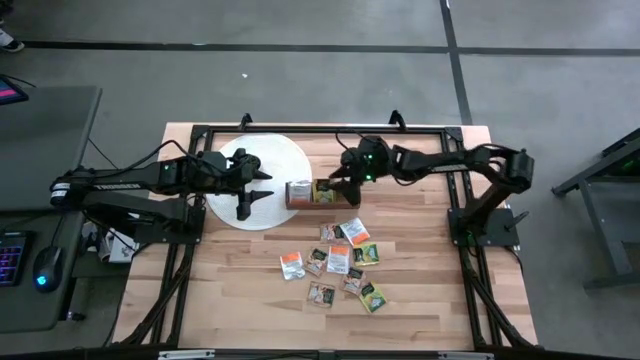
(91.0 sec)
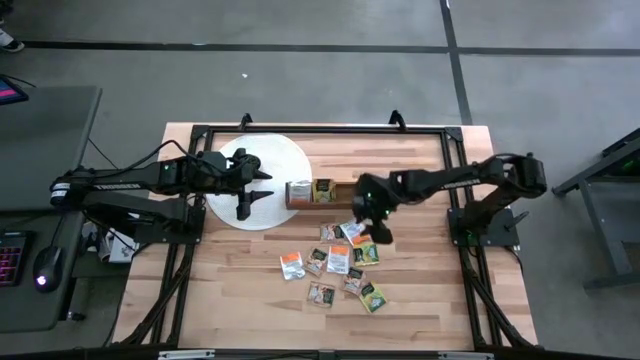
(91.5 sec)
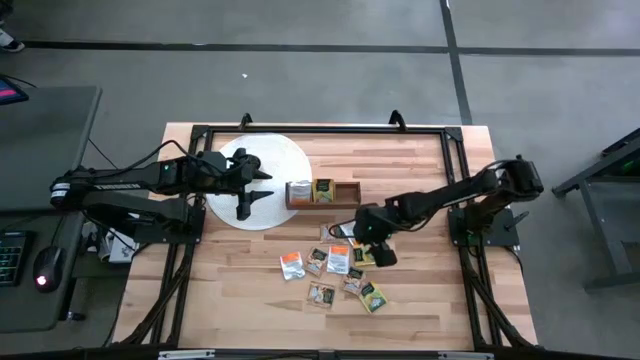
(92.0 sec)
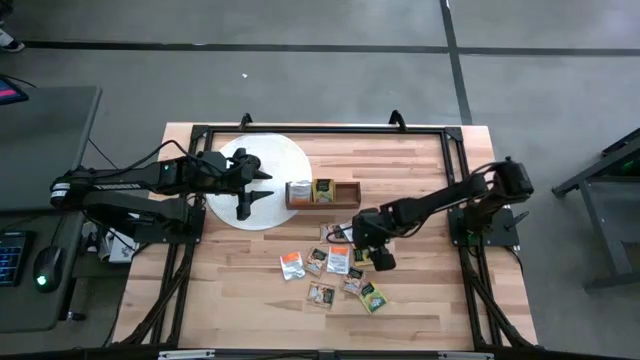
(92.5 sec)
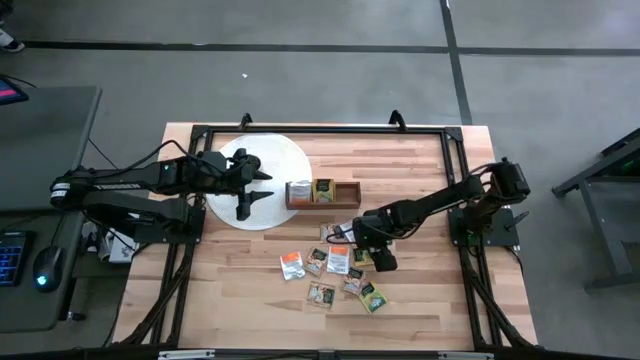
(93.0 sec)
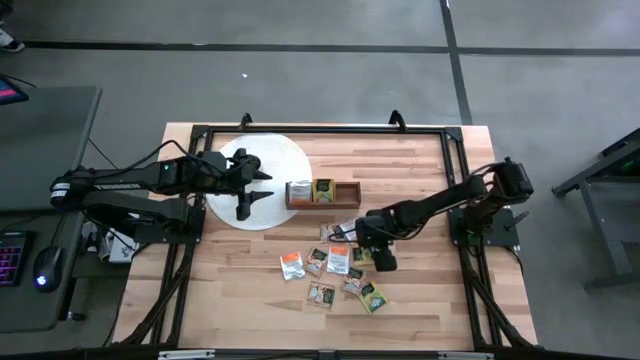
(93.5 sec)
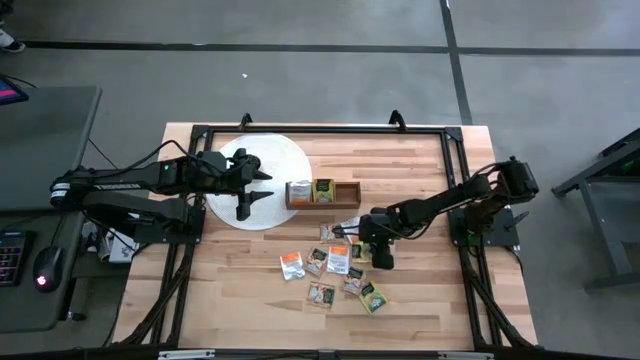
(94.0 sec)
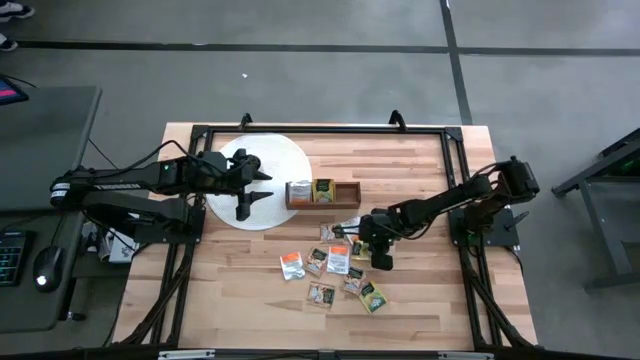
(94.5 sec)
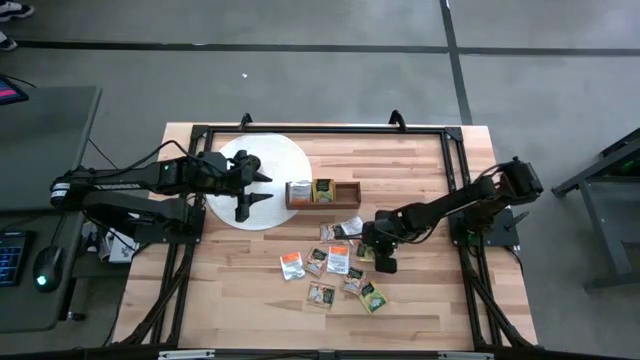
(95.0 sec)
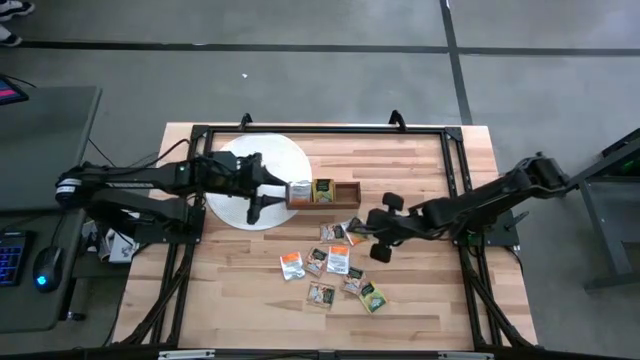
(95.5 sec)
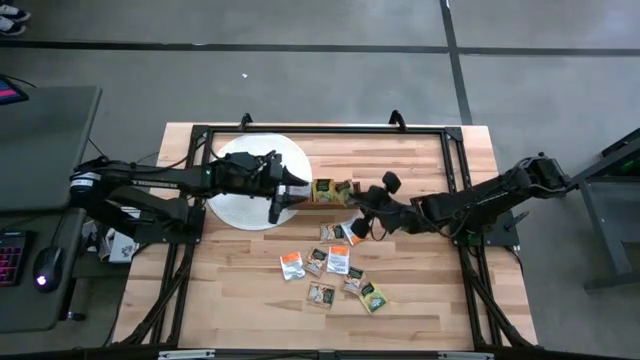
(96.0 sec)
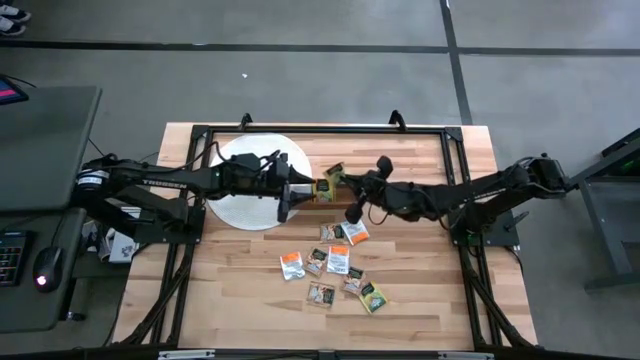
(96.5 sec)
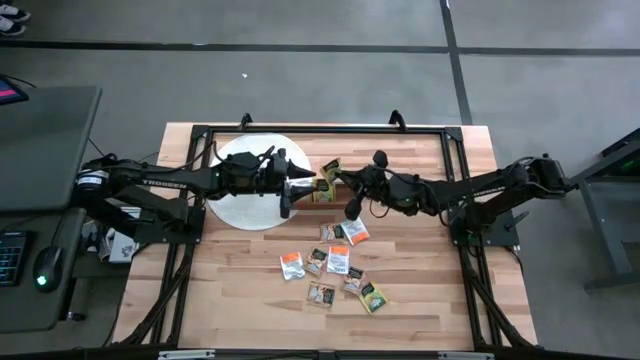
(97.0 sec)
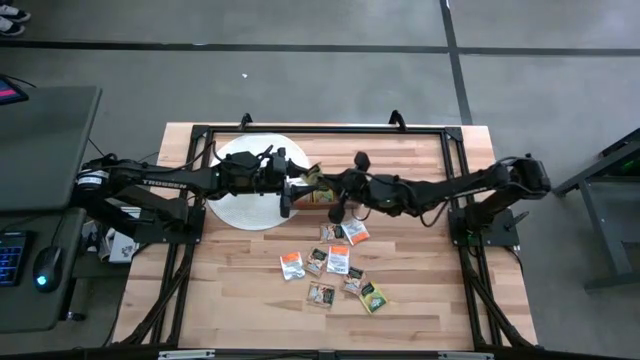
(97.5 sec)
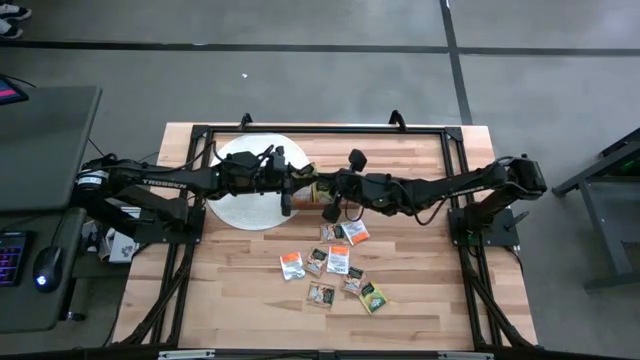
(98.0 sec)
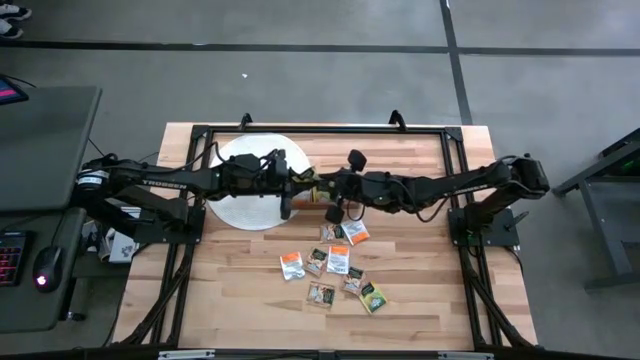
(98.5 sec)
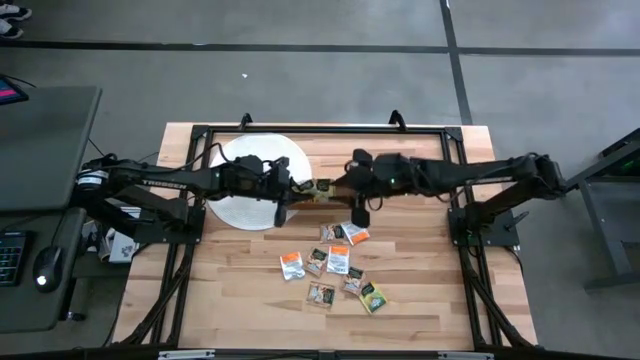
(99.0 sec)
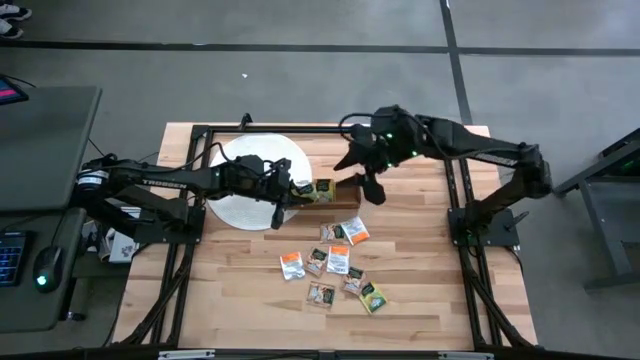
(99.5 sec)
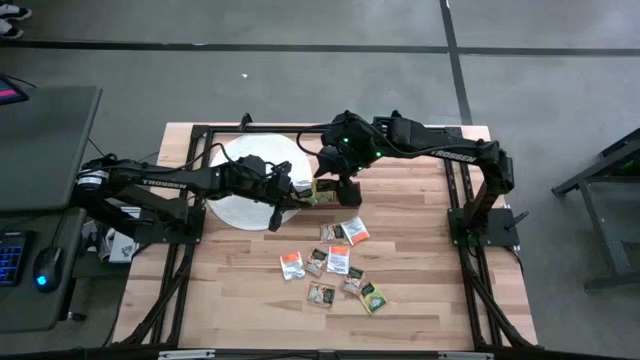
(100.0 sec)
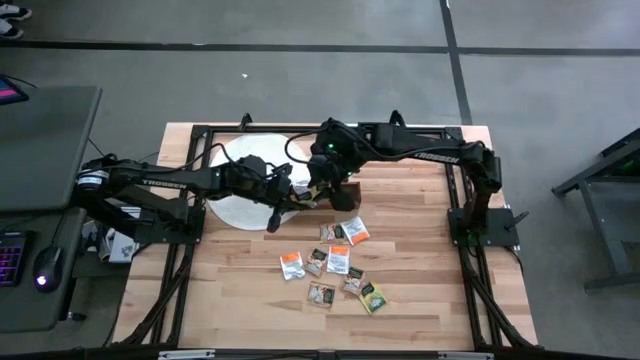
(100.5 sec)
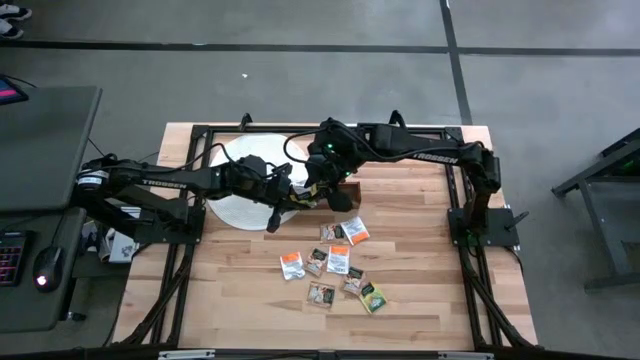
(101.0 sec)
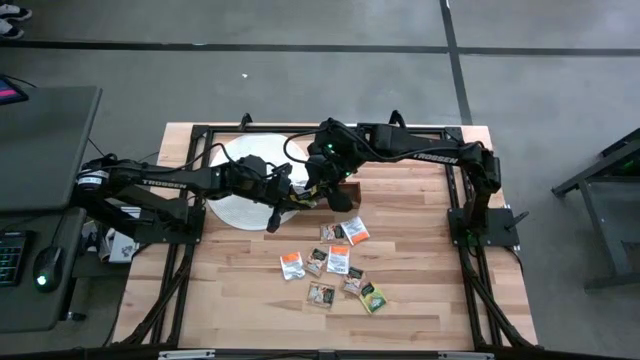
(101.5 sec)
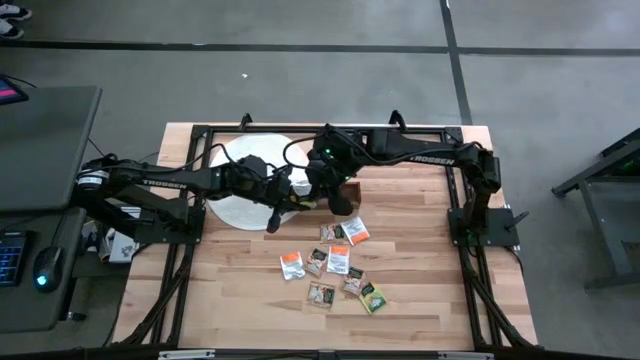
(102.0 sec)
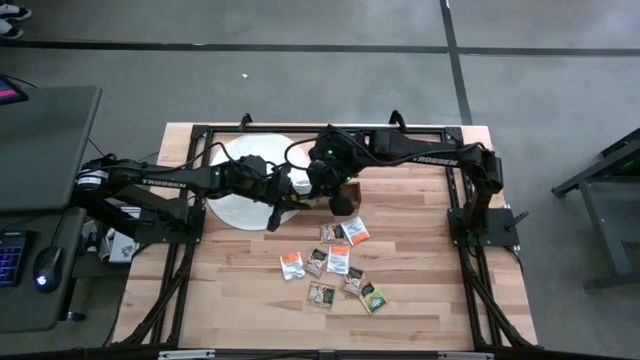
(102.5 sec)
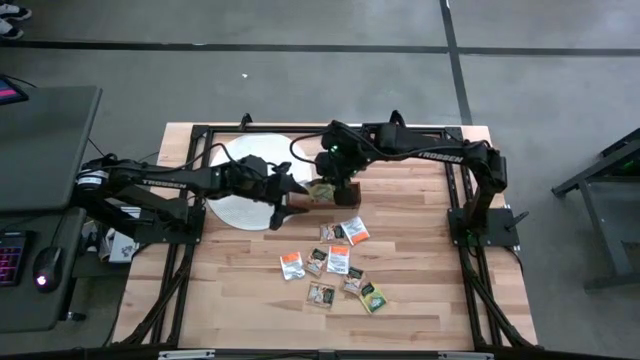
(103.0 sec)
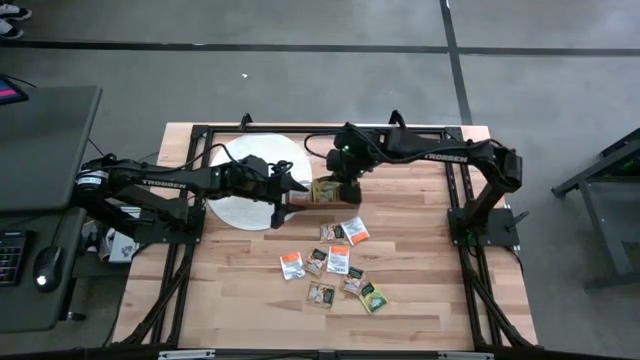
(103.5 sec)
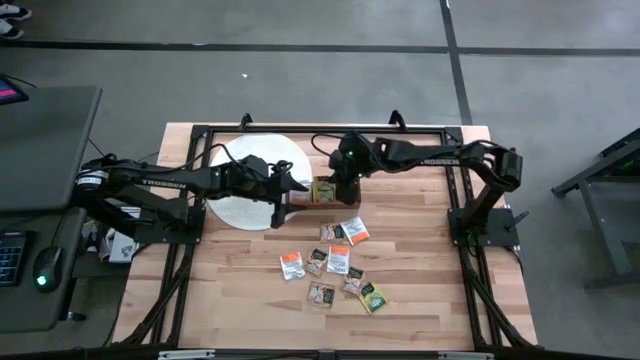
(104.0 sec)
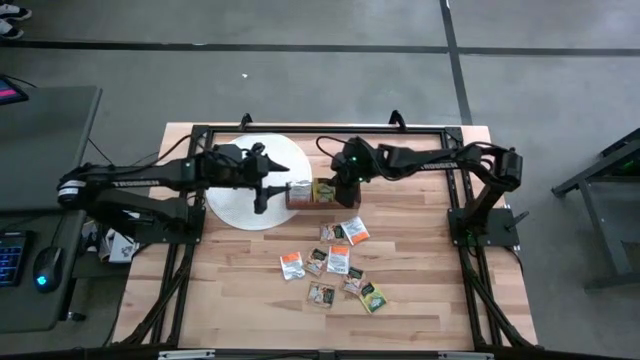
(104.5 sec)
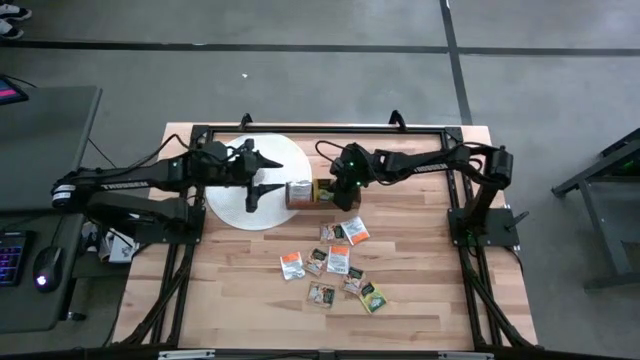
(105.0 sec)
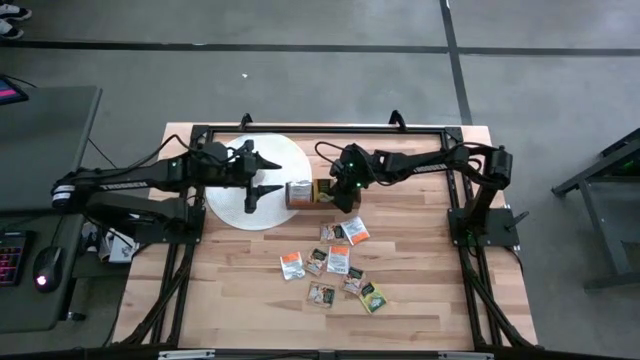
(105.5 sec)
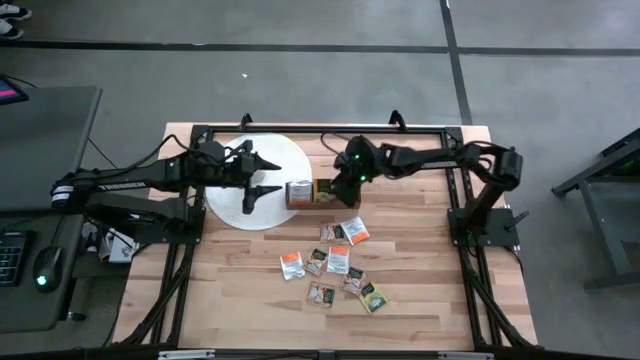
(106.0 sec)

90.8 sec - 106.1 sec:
Task: Pick & Place Tea
Put the yellow tea bag into the middle section of the wooden organizer

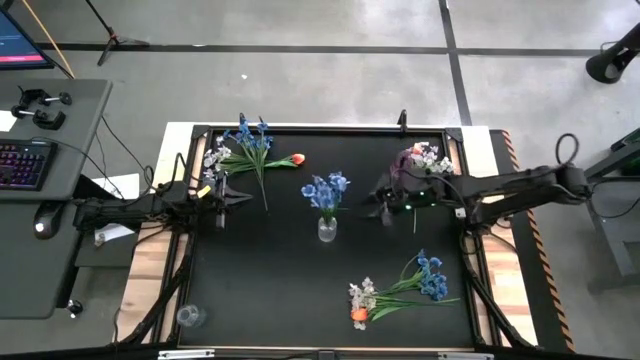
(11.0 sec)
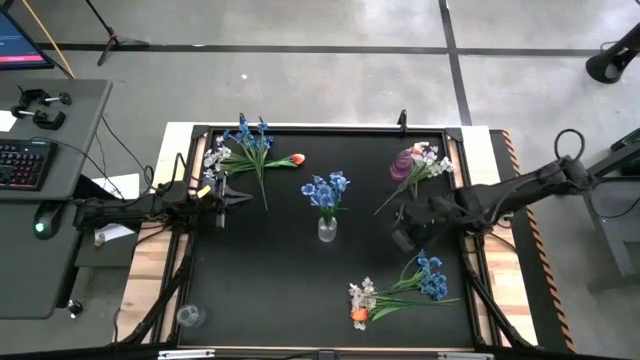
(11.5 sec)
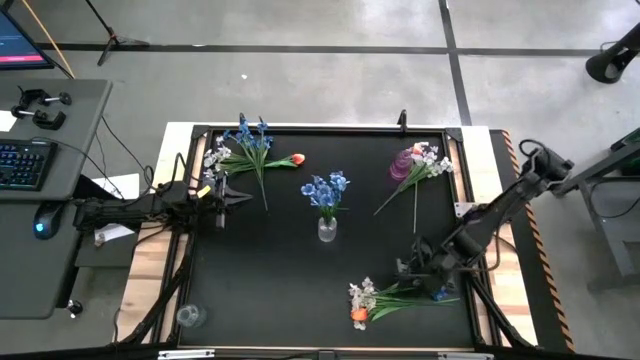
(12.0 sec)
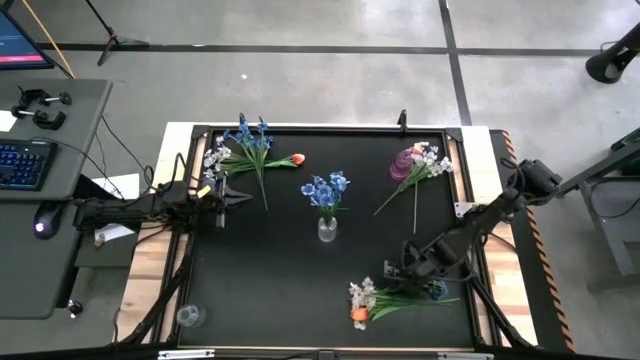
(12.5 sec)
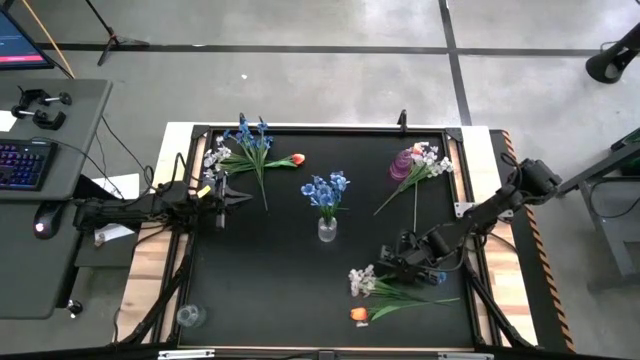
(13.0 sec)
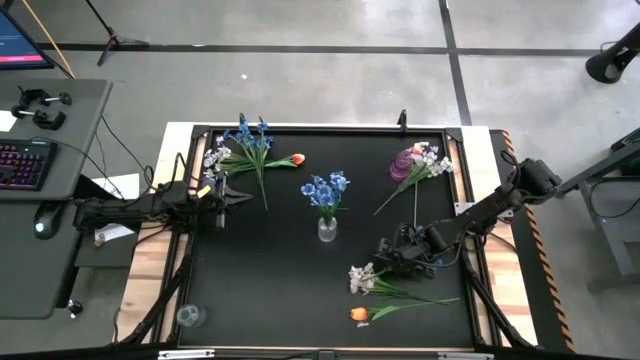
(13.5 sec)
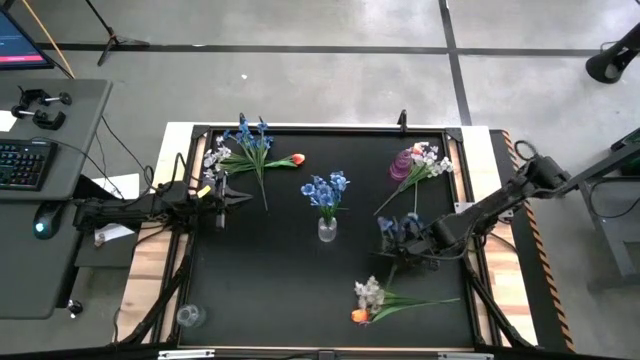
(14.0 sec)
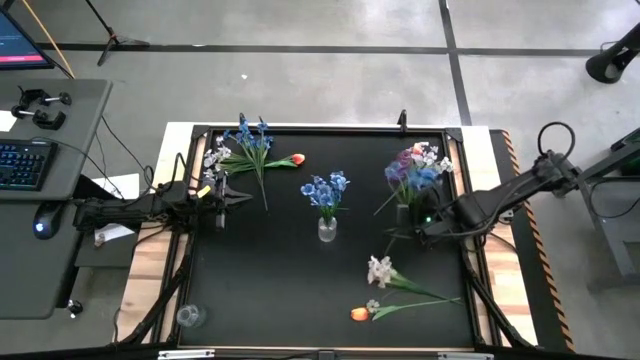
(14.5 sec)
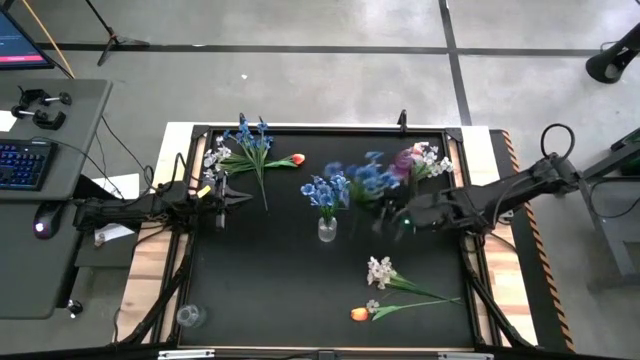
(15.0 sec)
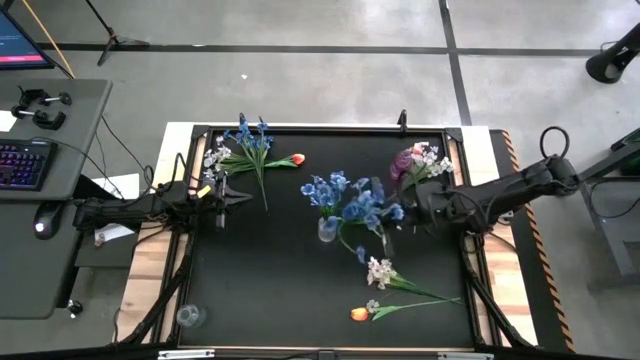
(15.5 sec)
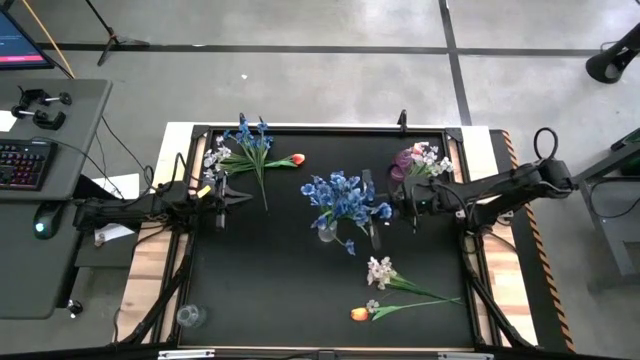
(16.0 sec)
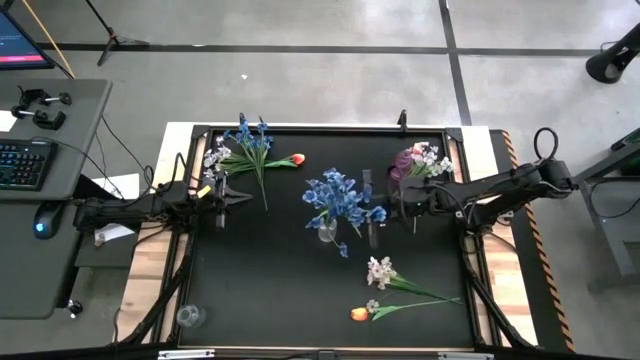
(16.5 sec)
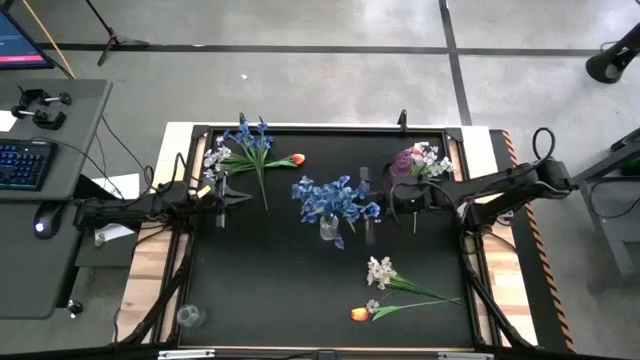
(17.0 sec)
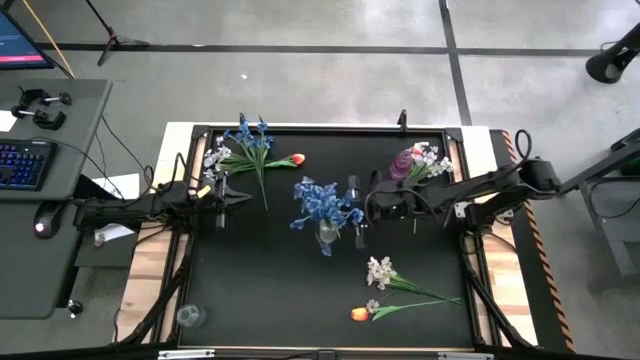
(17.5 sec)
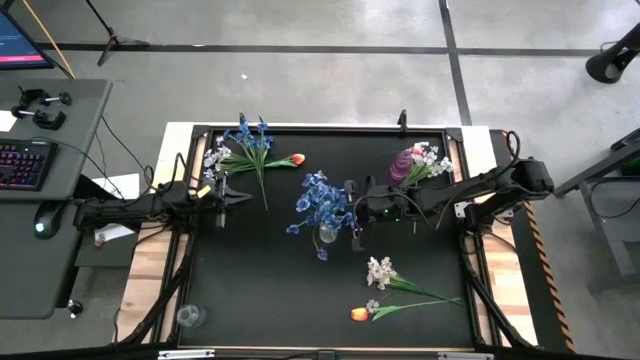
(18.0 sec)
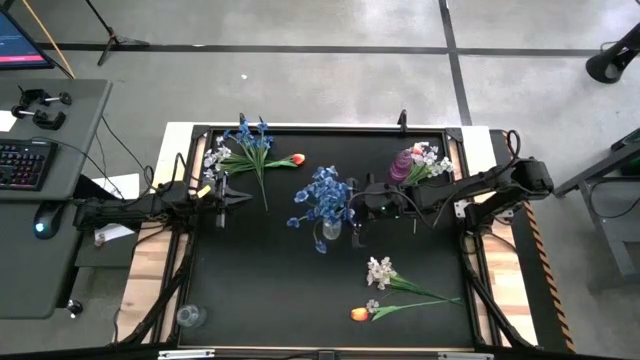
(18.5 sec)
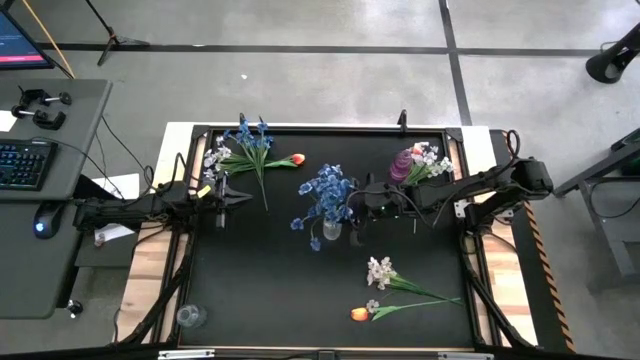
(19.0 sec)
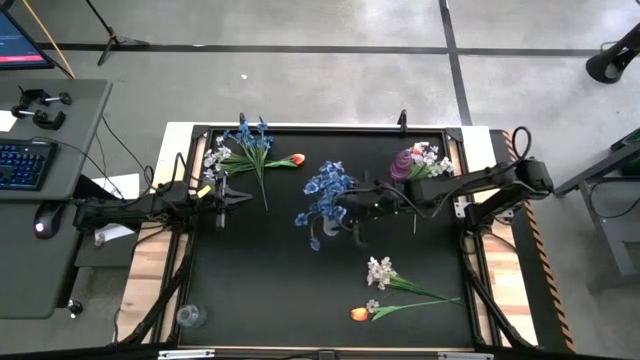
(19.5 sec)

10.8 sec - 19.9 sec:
Task: Sort flowers into vase by color
Put the bottom blue flowers into the top transparent vase
